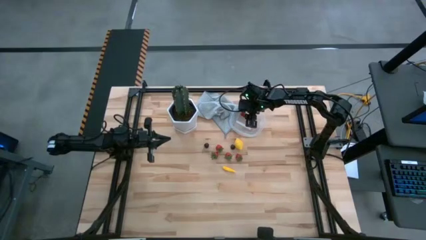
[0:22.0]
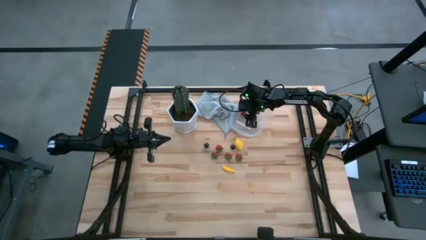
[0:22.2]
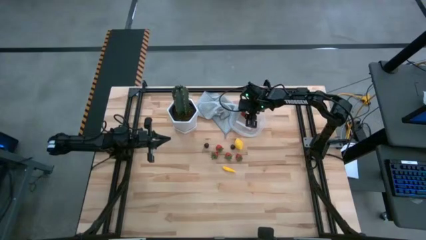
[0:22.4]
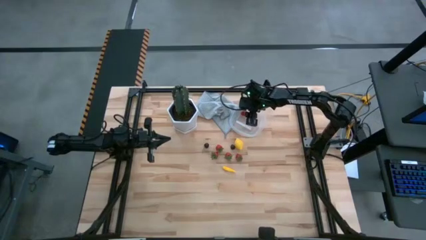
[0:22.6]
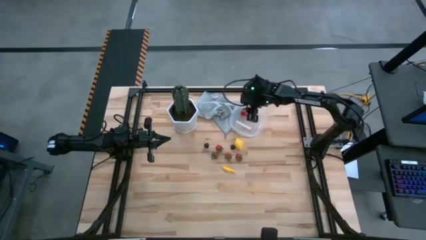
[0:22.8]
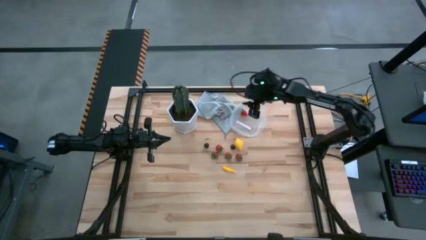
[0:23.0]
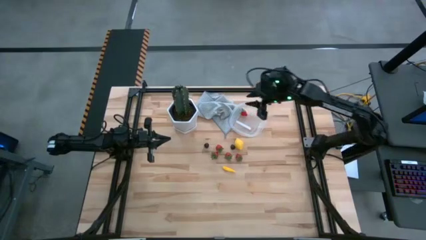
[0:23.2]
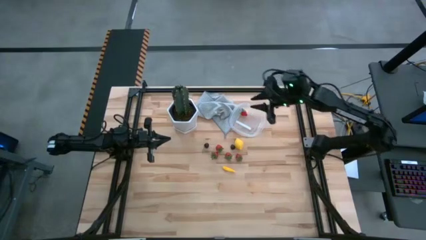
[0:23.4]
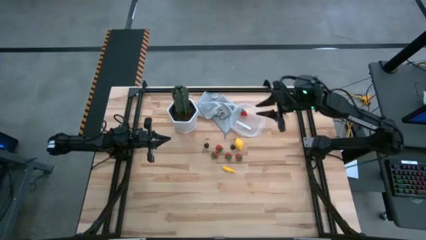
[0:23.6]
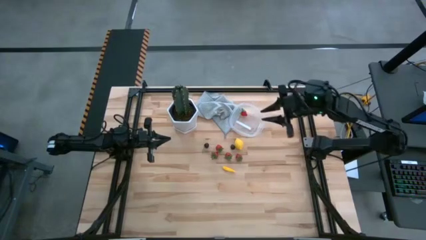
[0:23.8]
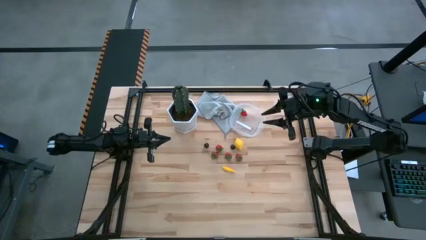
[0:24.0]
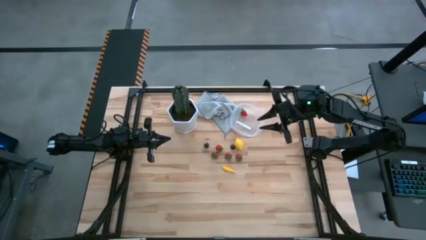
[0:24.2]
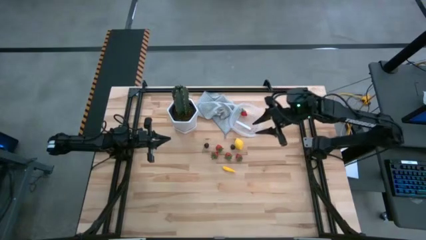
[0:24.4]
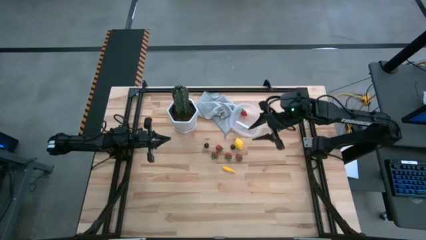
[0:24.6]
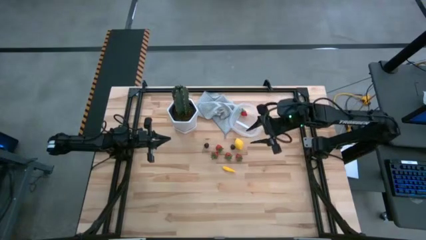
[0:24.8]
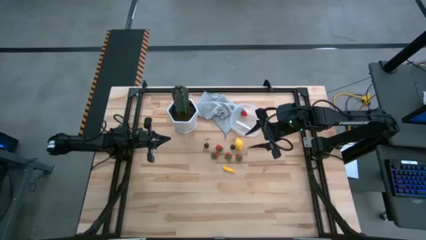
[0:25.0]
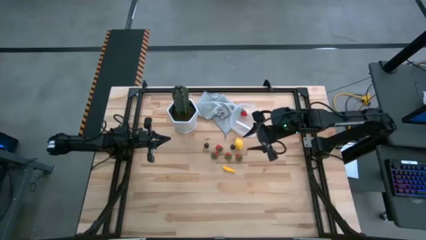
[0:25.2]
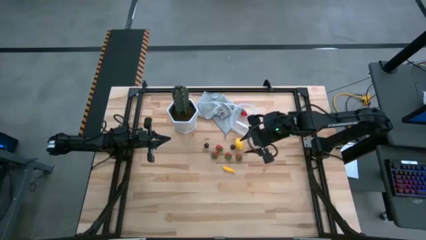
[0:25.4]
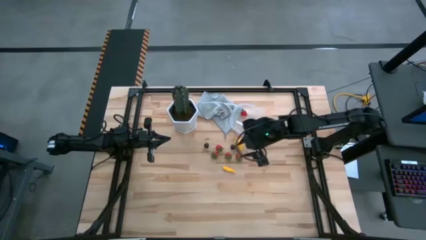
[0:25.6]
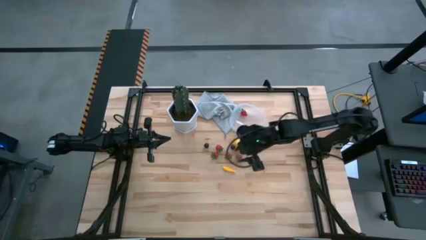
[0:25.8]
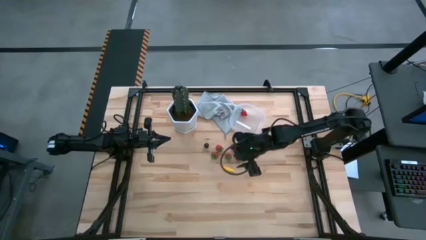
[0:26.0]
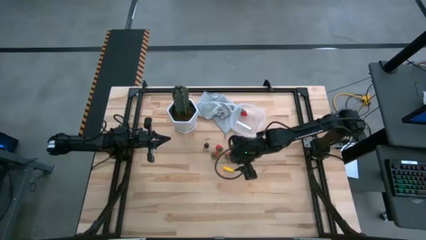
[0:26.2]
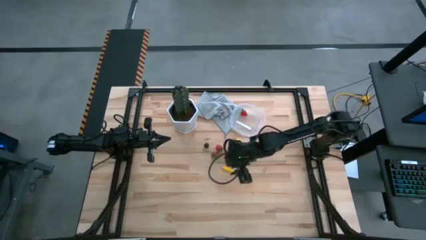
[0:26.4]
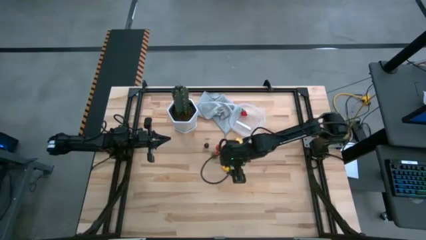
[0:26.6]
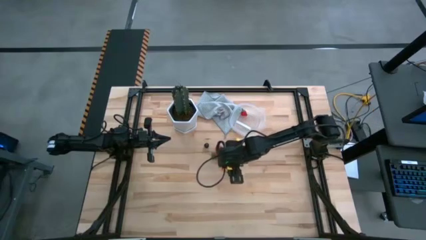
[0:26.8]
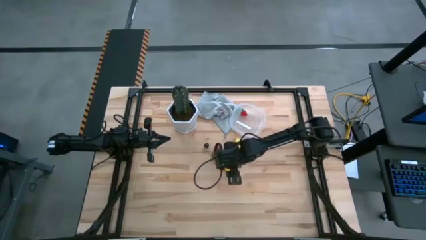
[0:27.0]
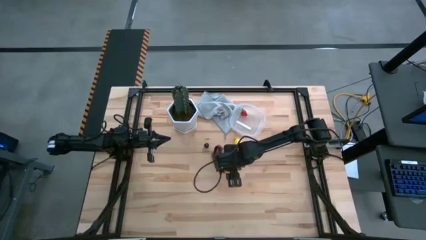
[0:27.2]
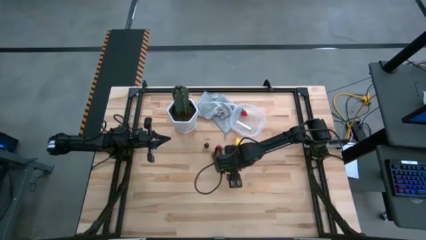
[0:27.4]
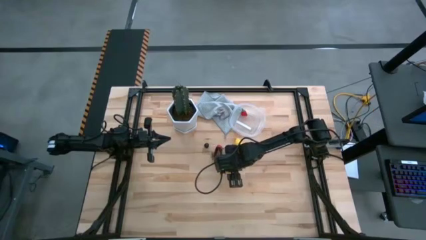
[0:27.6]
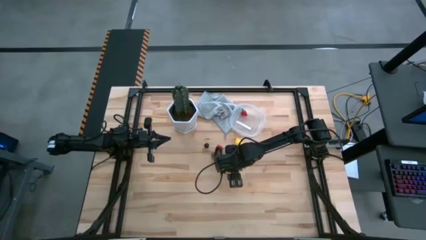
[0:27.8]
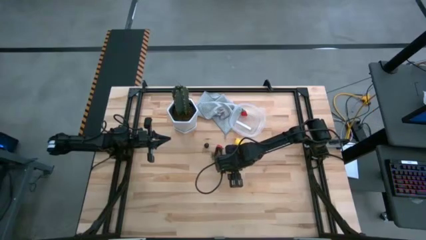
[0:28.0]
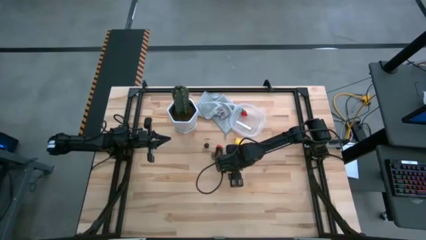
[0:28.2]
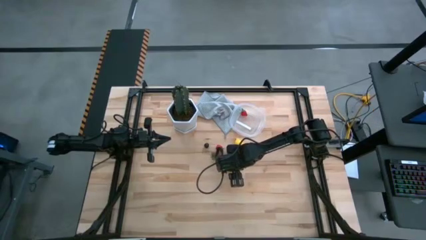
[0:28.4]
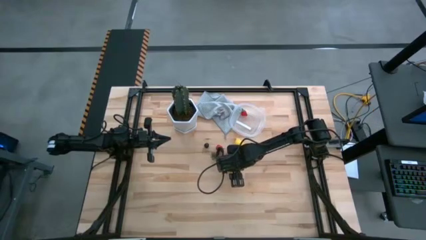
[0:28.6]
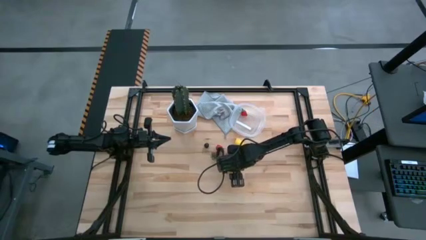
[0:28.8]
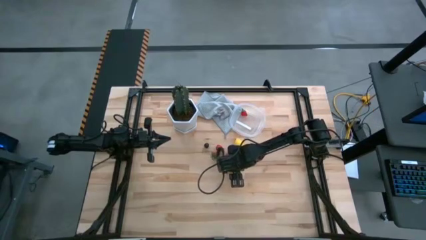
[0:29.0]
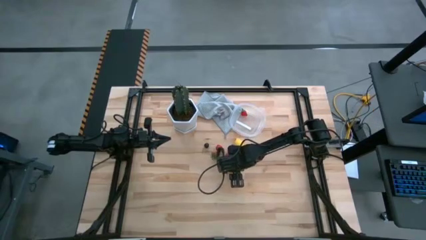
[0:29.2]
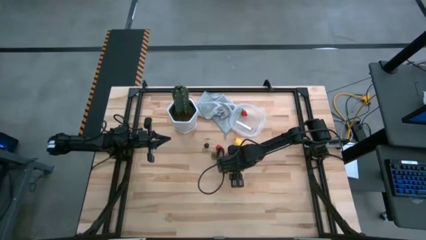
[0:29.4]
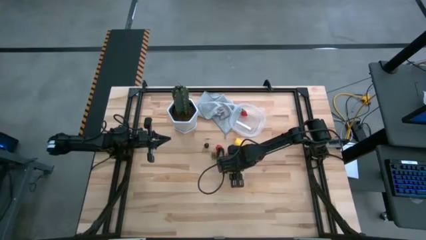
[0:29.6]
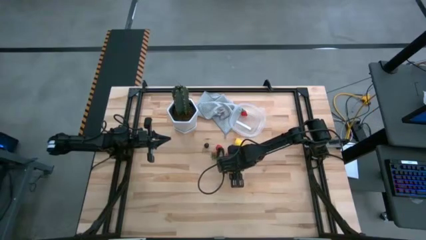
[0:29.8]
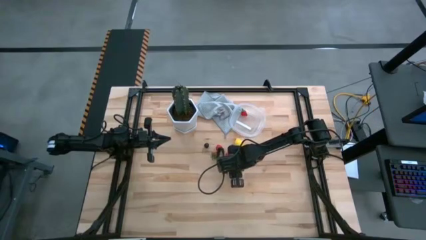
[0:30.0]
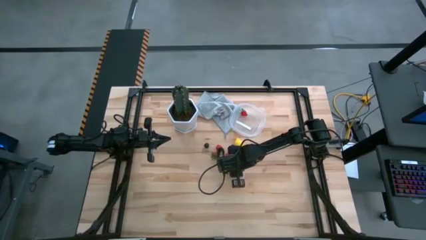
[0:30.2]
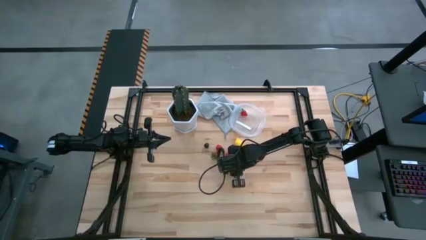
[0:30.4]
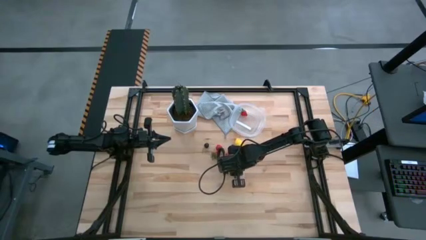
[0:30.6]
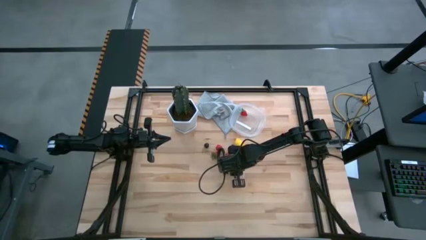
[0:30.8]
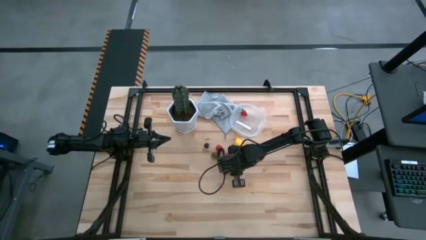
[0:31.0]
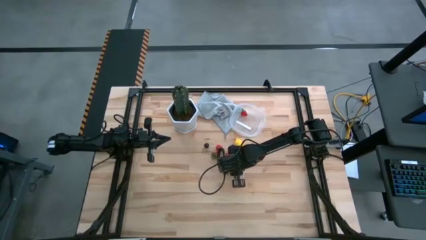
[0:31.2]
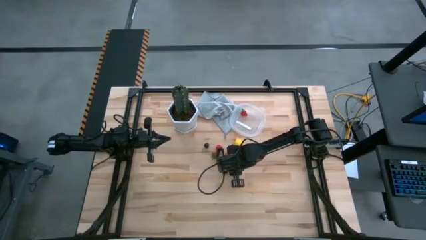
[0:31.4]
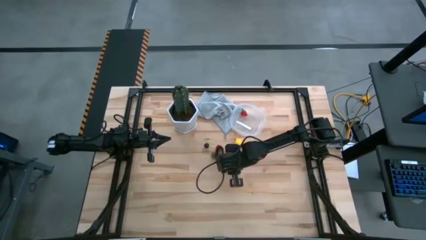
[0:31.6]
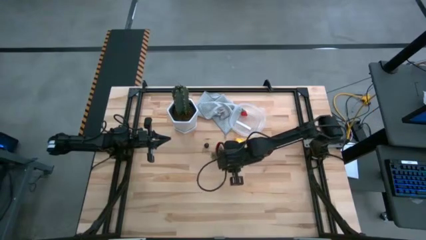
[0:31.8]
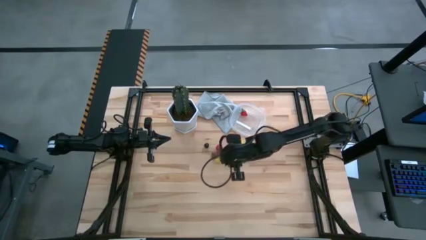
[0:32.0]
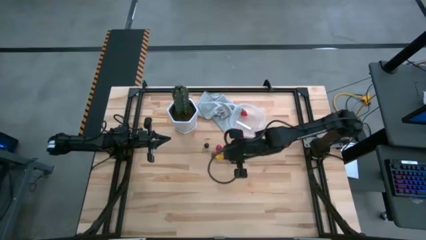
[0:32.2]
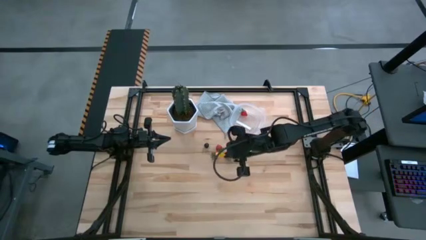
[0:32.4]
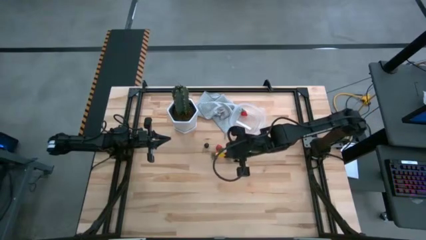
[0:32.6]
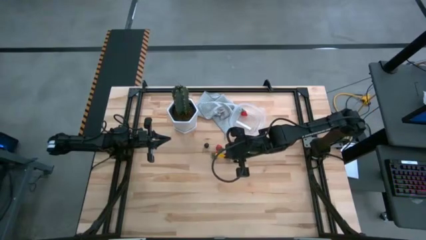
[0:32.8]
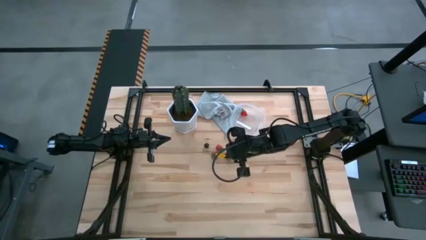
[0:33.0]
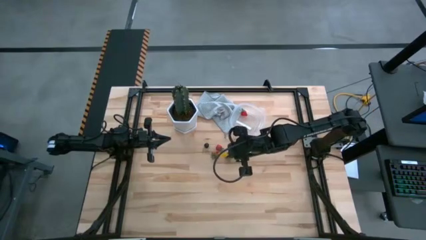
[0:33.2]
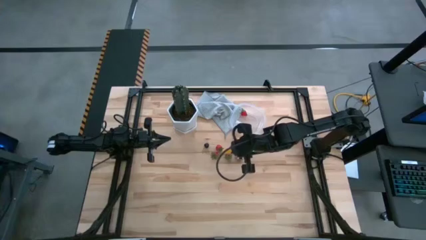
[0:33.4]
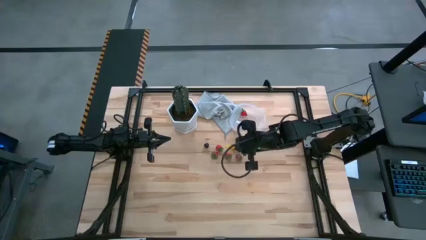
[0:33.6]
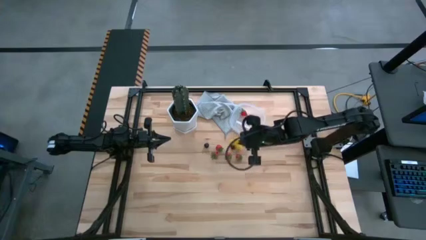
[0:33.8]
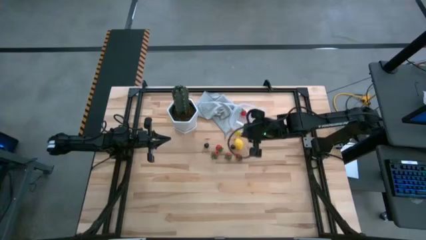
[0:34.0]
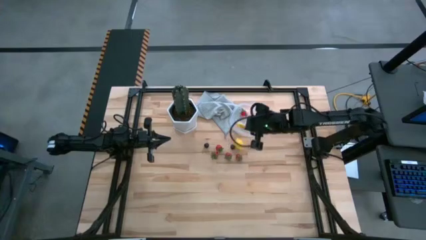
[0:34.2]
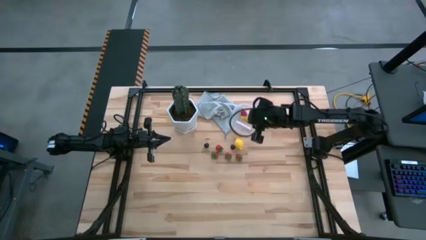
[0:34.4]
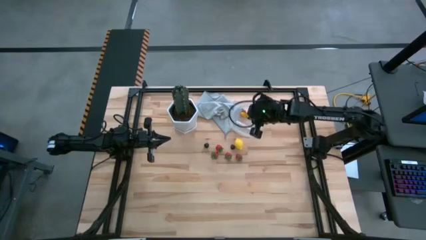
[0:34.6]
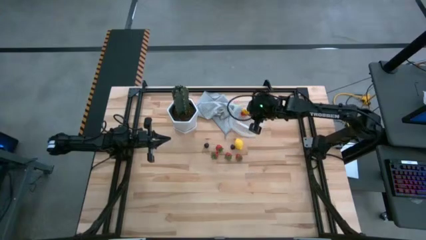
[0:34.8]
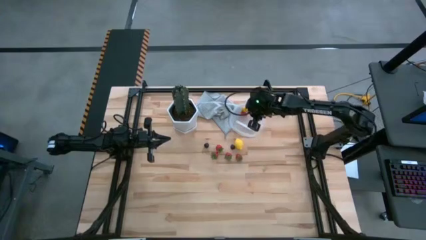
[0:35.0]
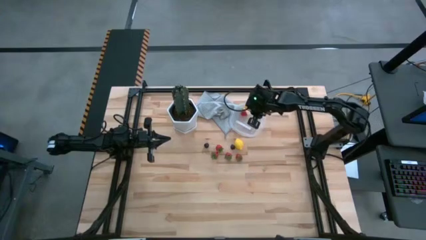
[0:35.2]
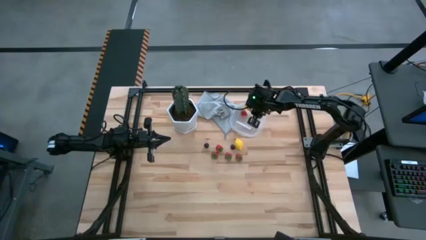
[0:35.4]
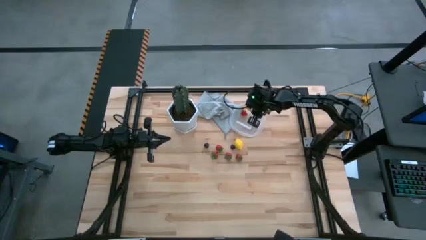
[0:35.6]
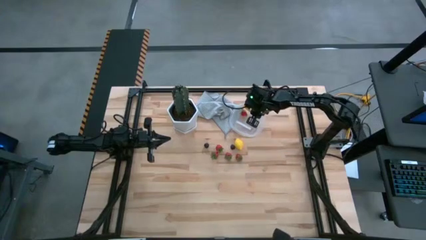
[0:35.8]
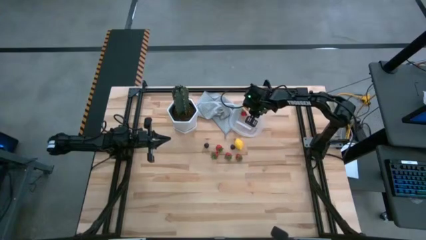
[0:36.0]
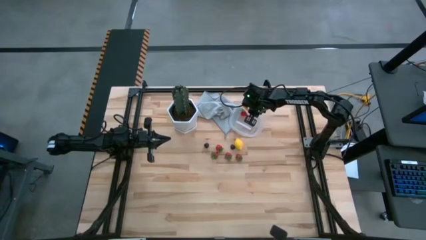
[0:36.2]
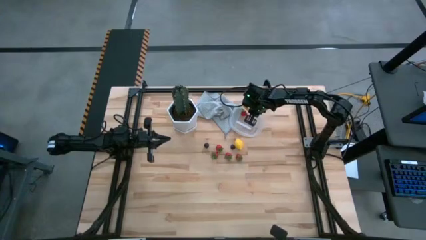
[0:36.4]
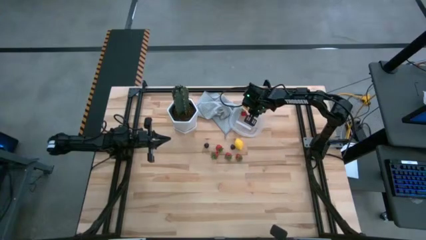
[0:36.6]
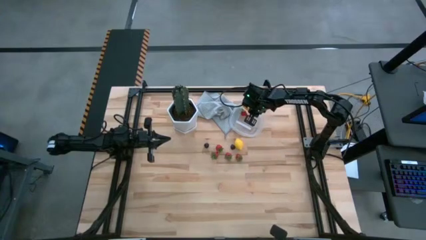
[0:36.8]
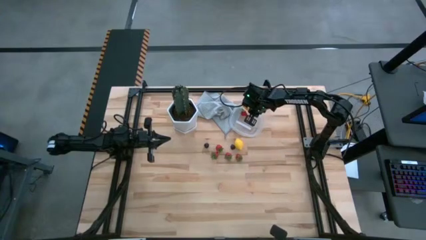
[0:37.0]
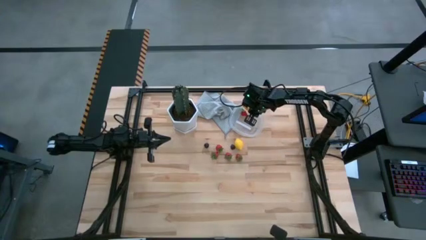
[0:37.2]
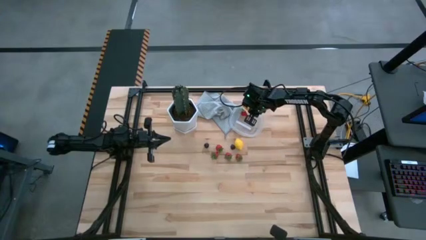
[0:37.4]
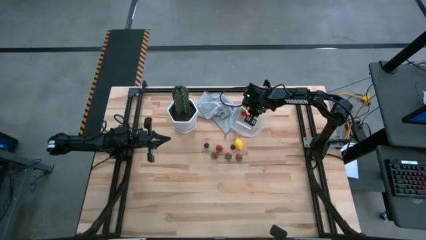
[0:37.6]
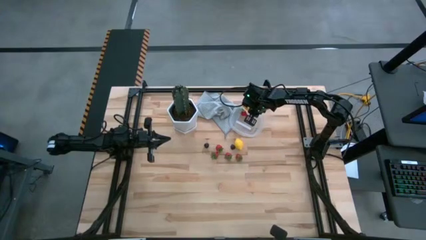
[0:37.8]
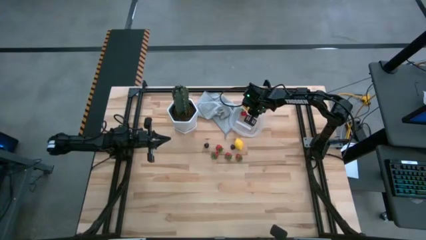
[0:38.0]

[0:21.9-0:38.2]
Task: Pick and placing Produce into tupperware
Put the corn into the transparent bin
